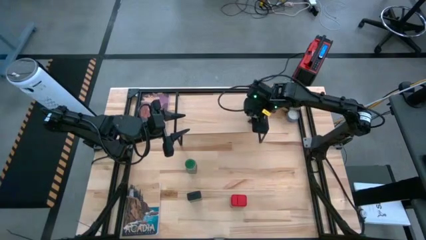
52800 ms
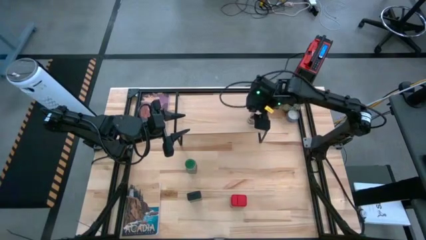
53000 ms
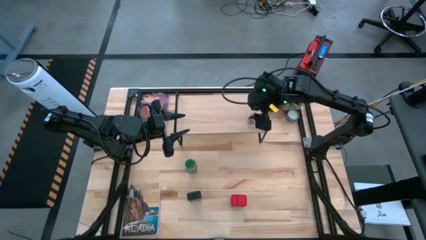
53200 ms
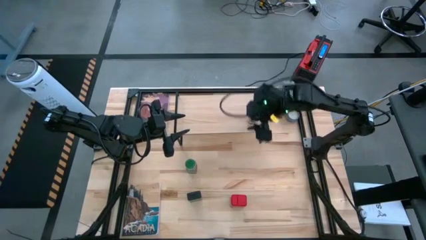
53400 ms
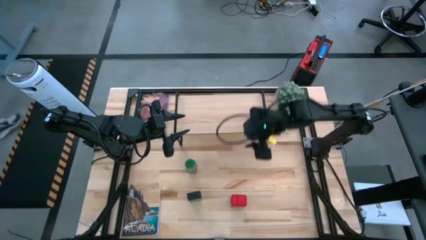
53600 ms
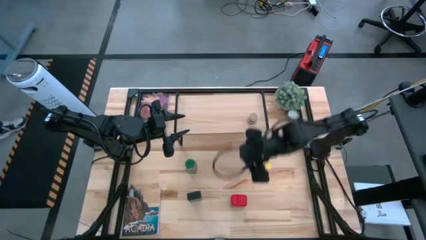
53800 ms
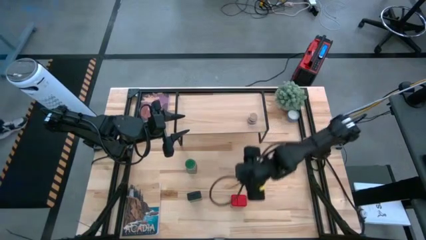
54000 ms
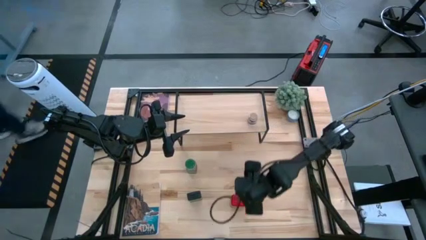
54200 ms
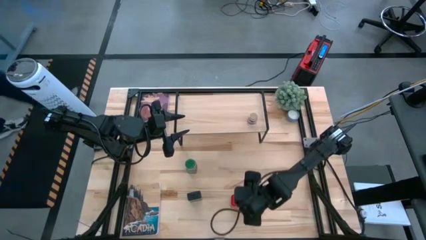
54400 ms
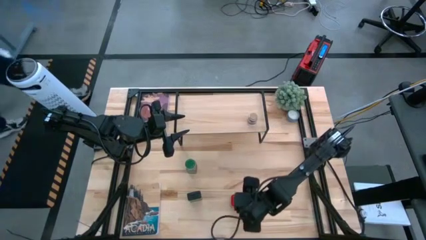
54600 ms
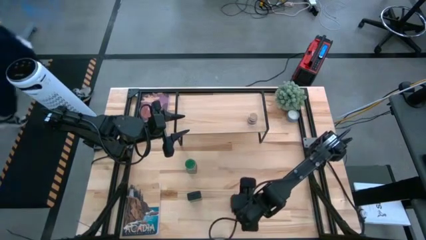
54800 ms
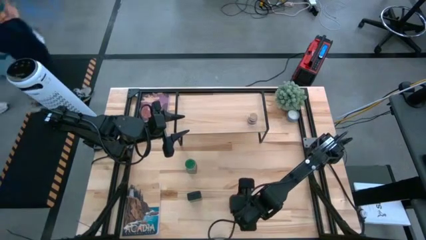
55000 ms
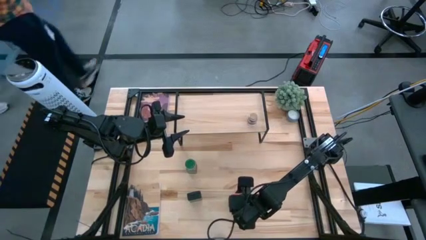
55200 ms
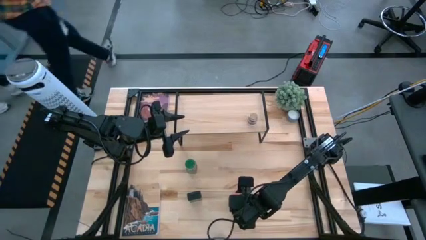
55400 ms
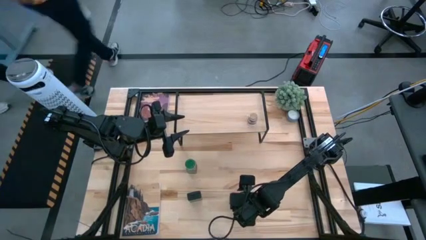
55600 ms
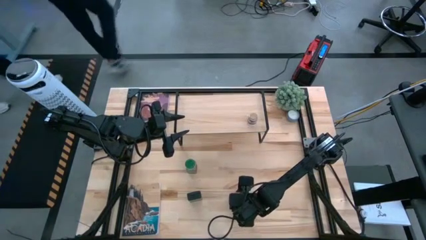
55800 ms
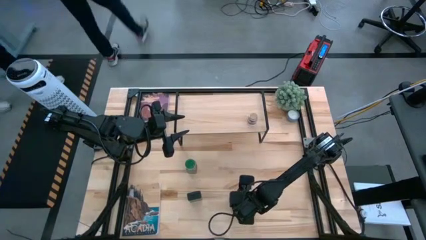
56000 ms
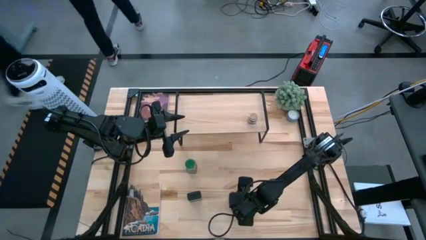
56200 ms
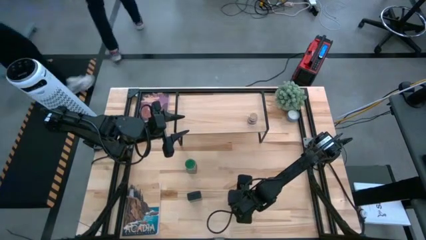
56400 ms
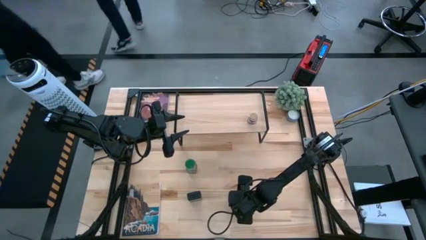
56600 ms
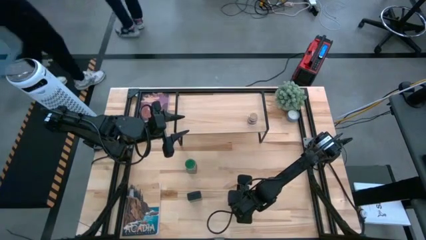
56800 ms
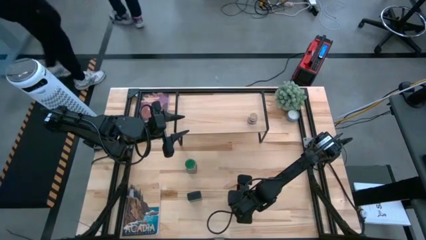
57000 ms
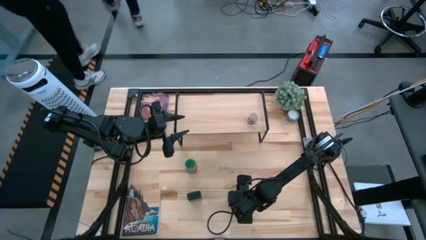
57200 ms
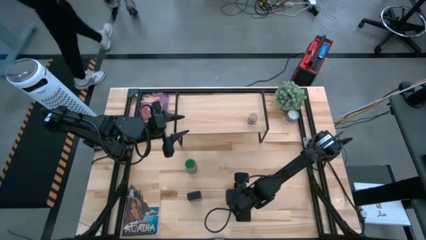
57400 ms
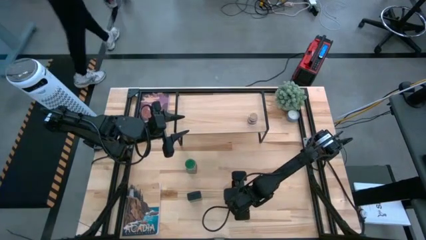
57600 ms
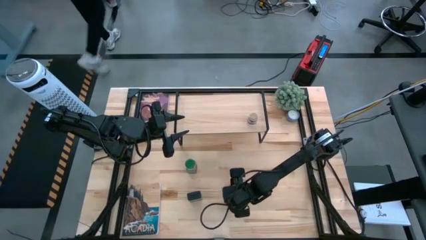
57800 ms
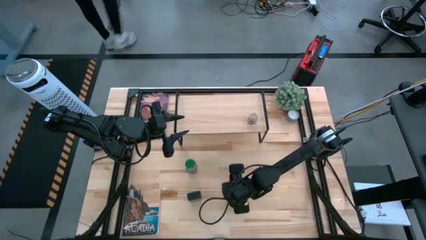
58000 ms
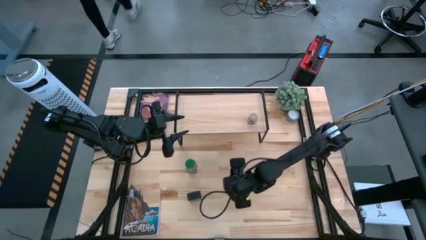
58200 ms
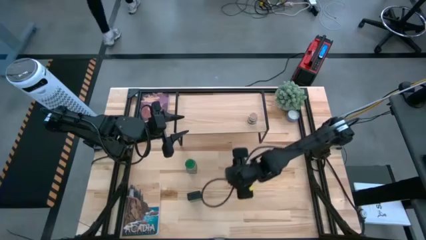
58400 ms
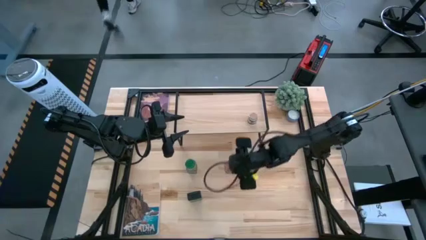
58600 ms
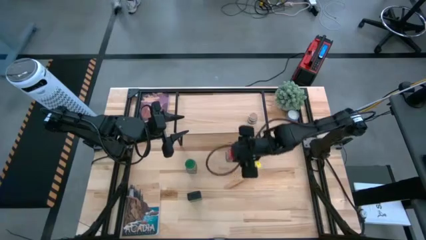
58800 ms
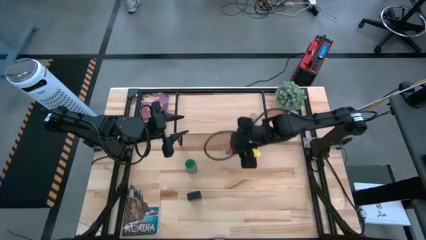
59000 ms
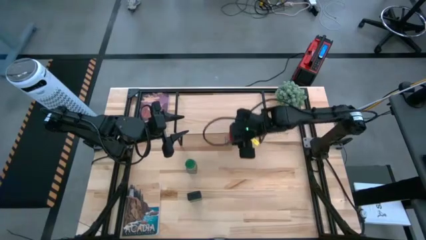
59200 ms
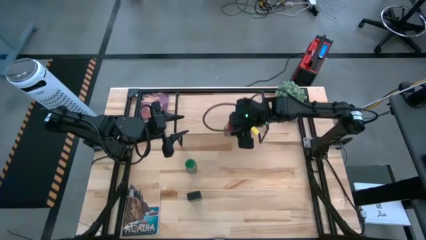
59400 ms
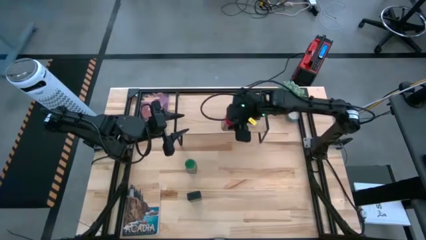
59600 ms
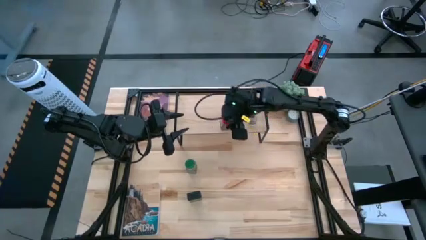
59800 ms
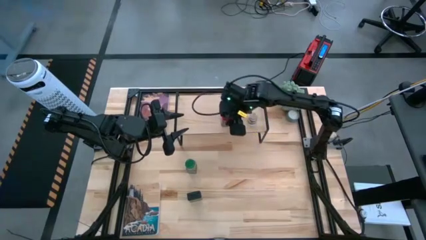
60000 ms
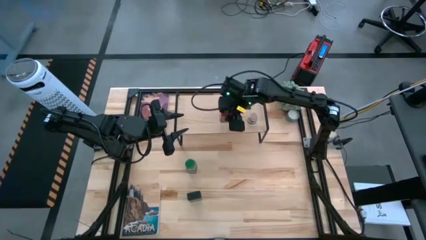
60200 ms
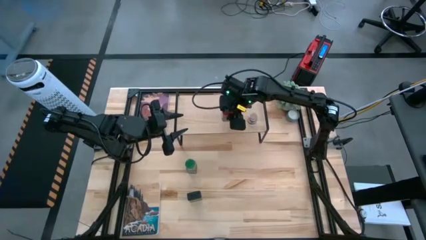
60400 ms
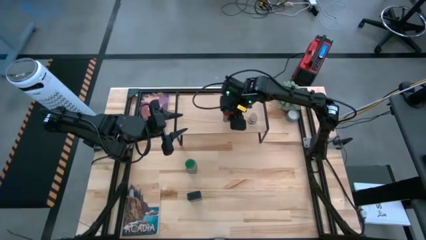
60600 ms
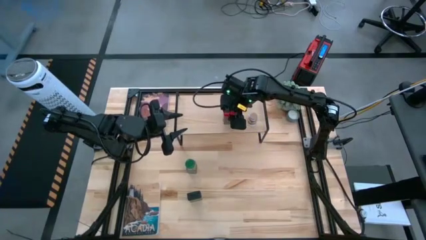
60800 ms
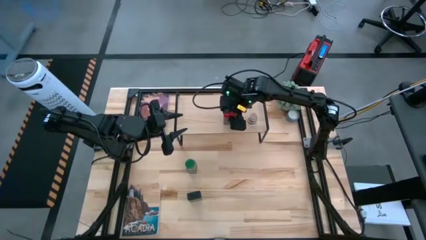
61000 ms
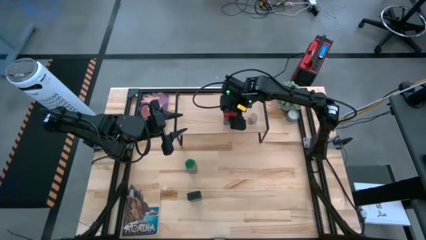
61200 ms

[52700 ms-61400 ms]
Task: Shelf spices
Put the red seasoning can on the shelf

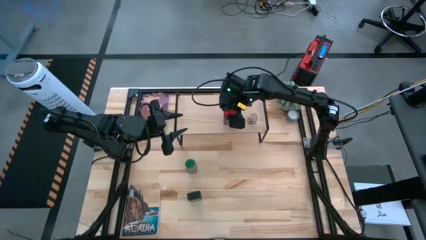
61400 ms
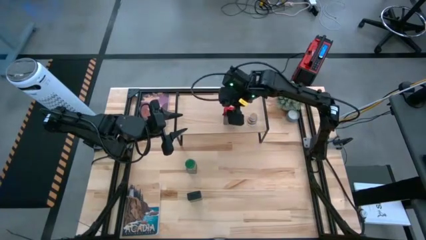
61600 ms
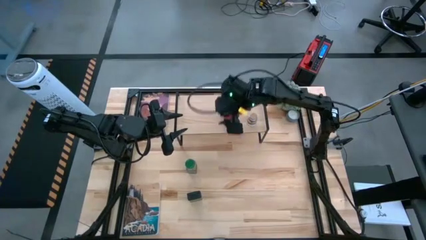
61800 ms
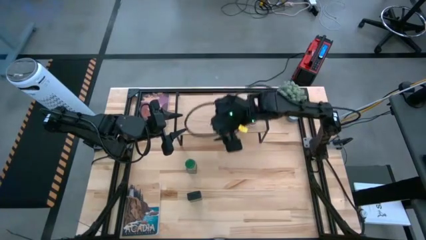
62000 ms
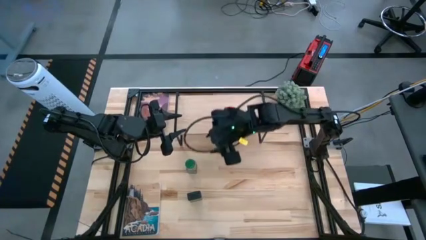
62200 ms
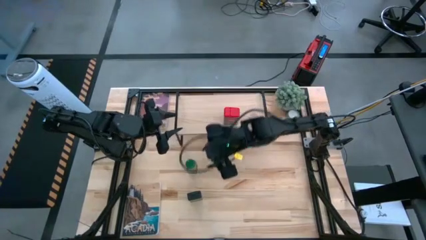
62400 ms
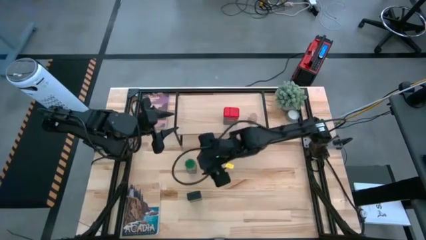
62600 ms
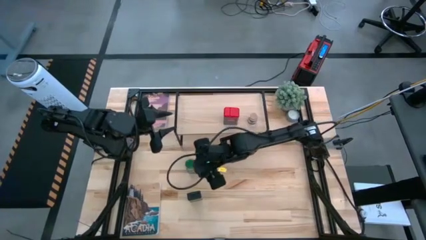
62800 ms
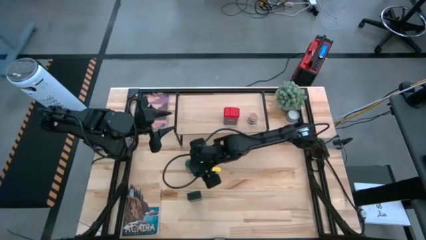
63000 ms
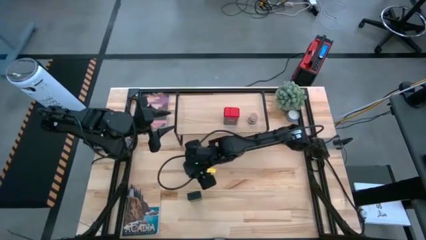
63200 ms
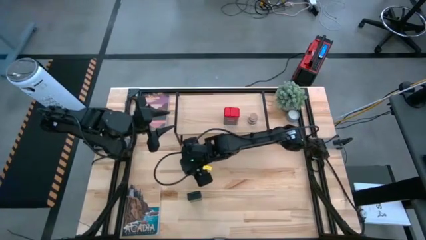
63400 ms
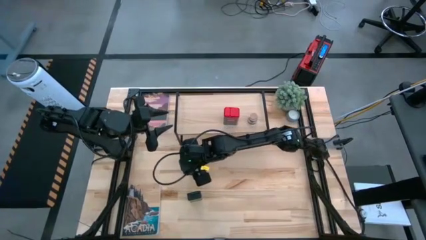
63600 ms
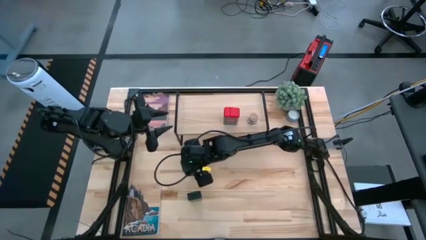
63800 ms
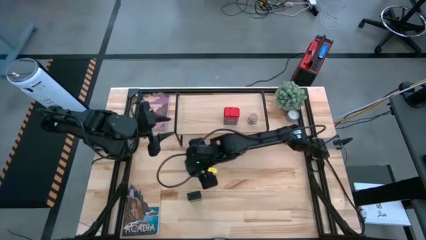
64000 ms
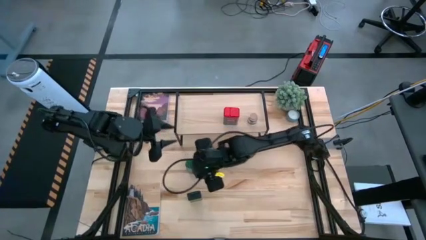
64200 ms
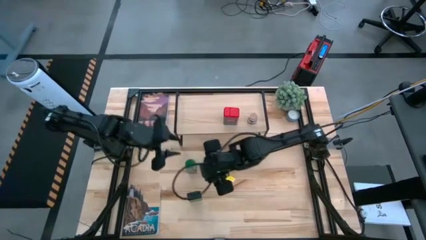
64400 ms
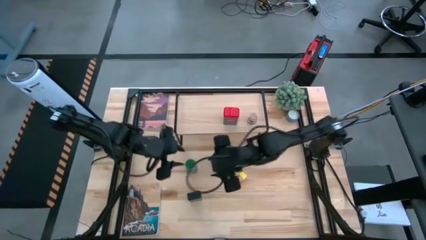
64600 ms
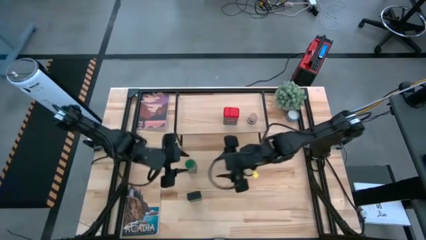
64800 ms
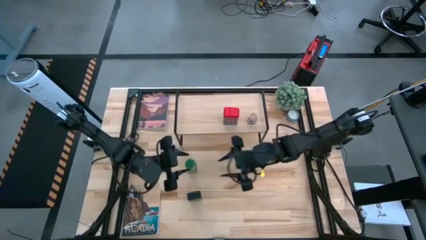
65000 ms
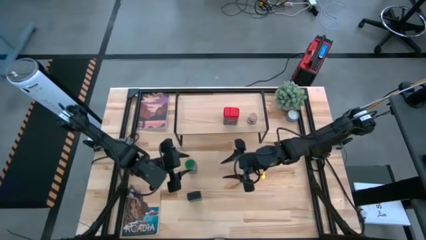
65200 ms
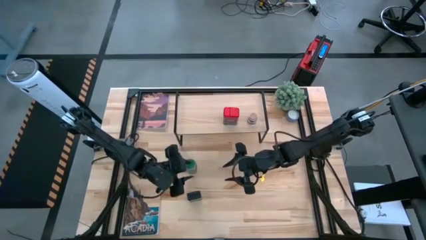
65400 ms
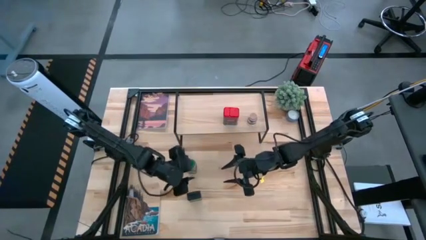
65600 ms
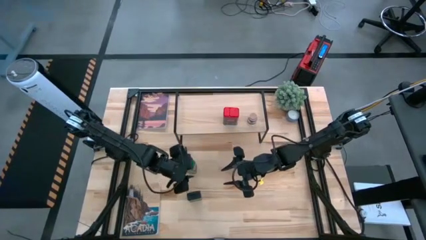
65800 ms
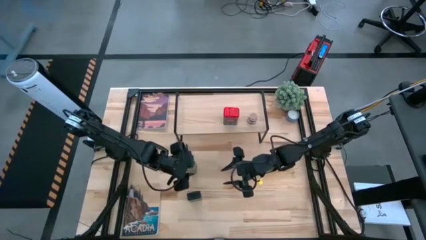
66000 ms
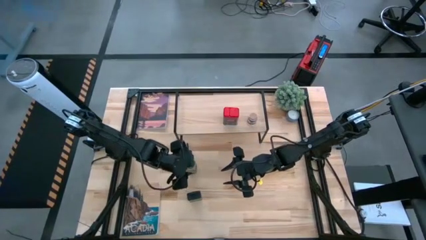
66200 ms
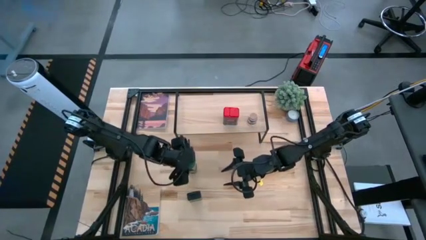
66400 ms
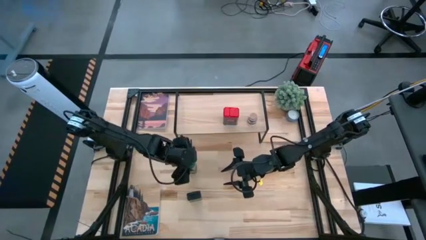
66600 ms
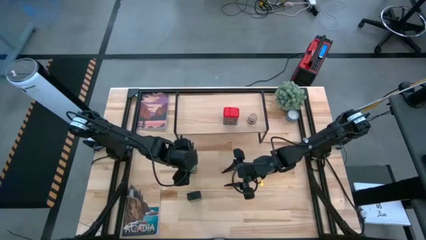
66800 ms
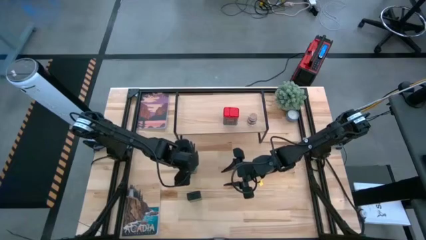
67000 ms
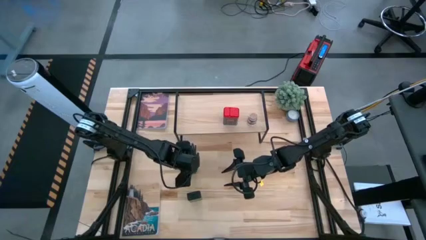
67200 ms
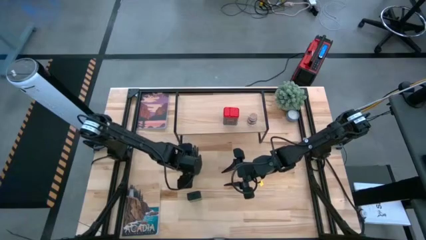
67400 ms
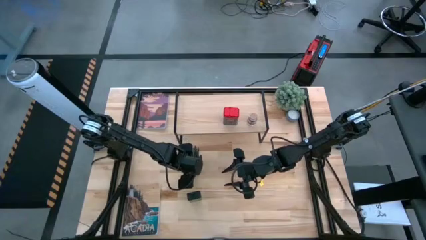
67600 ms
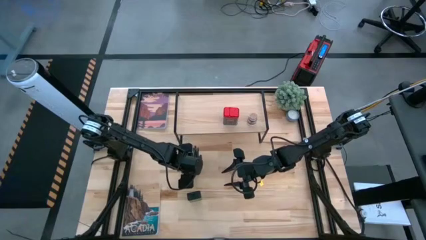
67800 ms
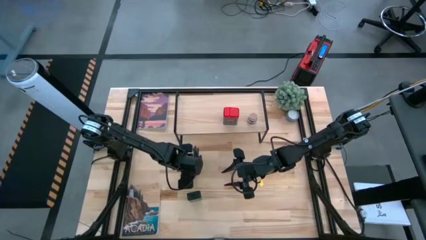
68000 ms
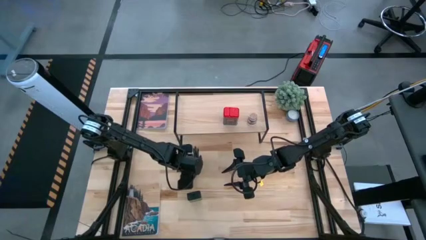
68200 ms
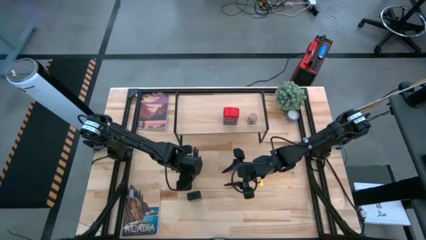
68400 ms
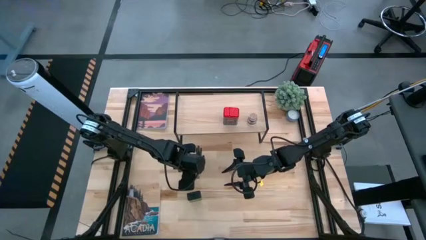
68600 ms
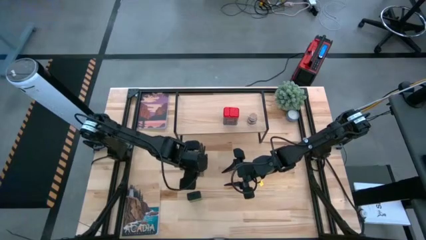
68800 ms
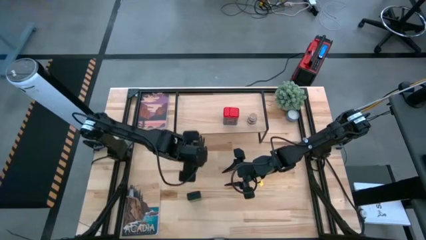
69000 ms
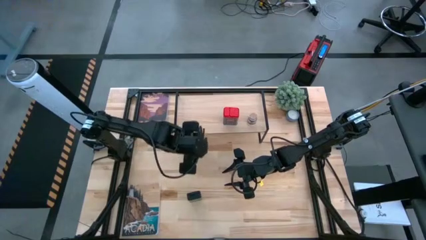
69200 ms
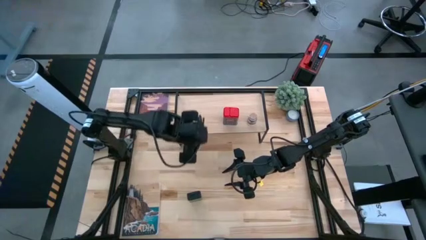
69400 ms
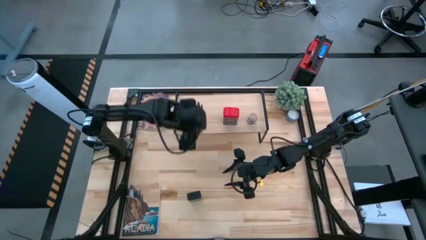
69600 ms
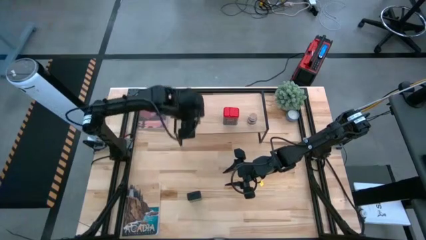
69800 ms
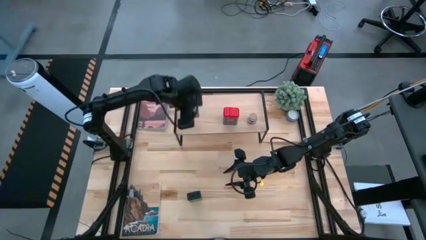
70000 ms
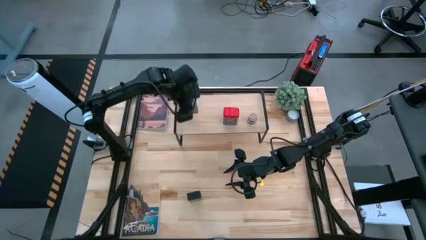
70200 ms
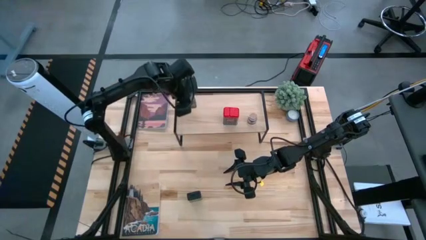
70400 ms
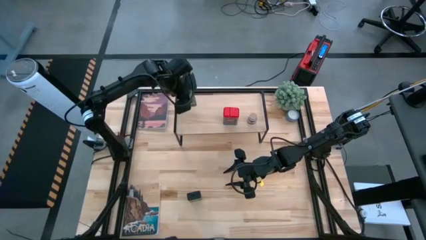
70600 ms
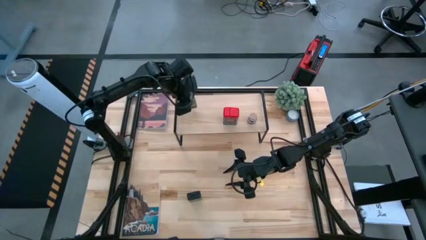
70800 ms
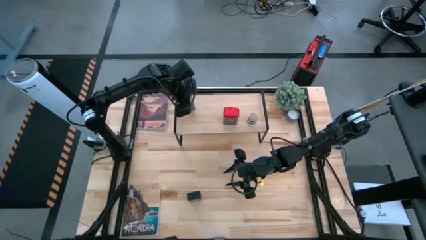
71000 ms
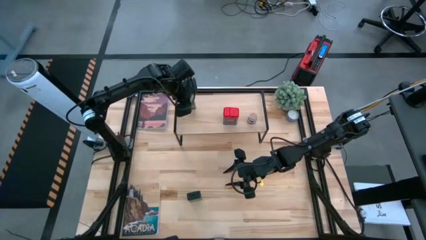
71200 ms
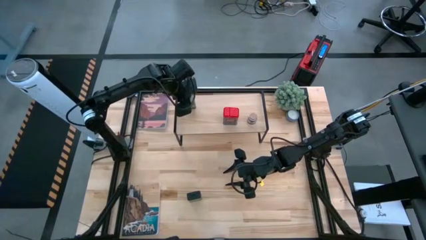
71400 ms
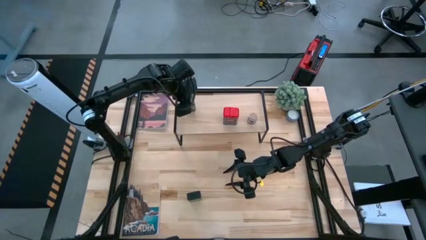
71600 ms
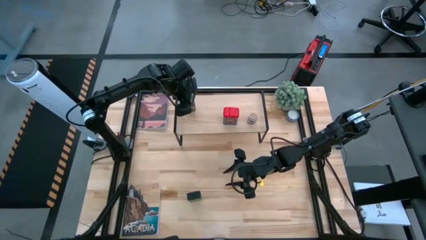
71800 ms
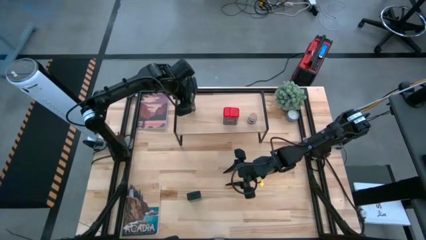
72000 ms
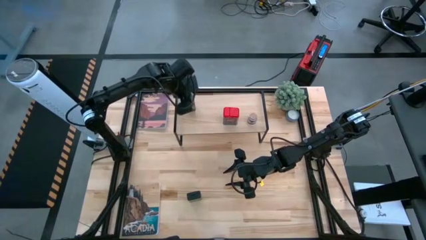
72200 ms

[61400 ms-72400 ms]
Put the green seasoning bottle on the shelf
